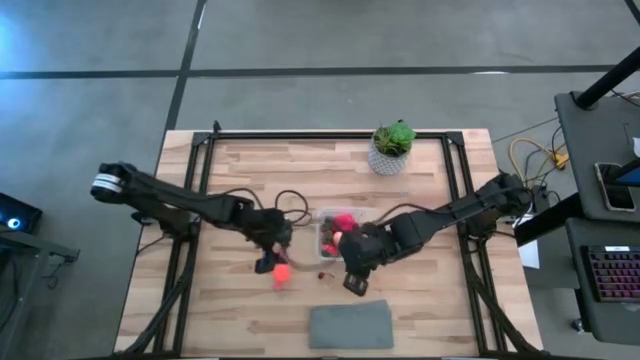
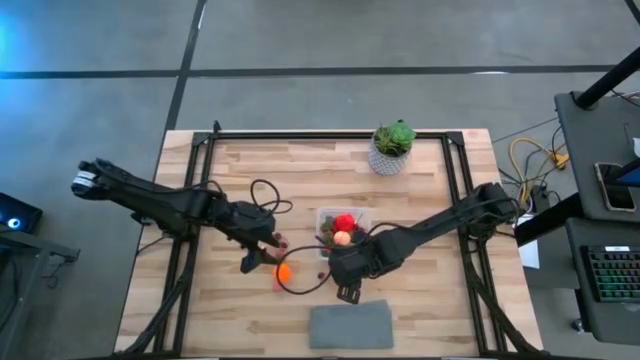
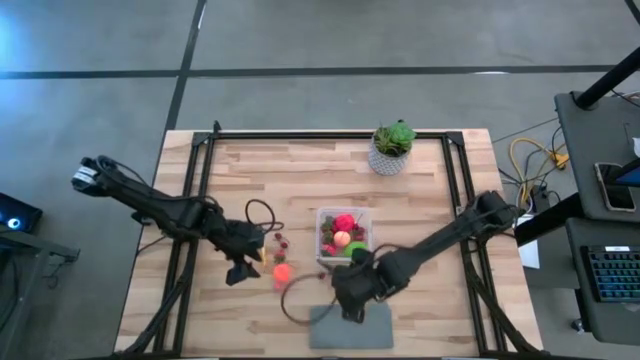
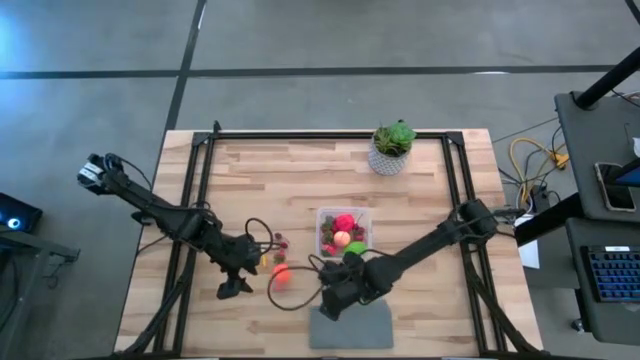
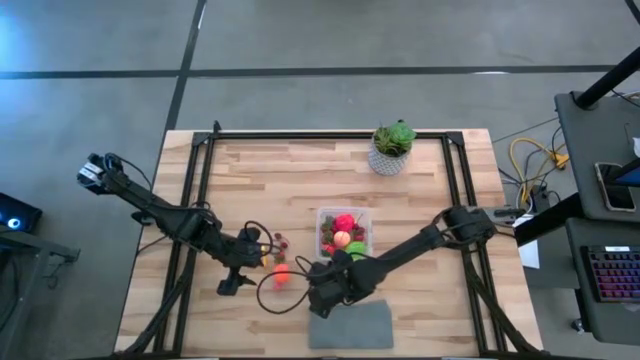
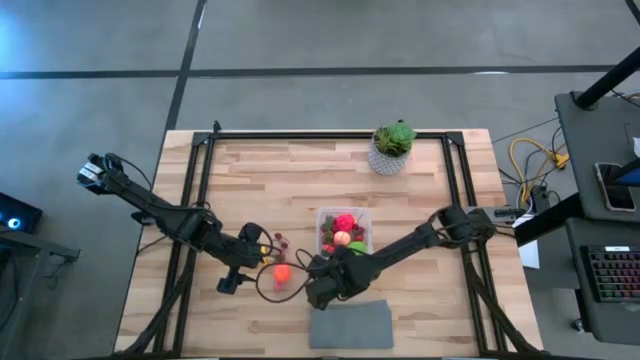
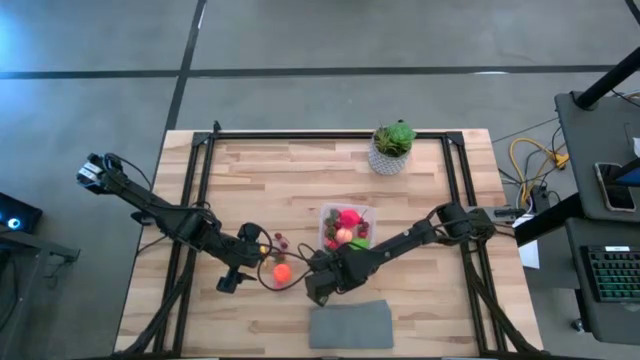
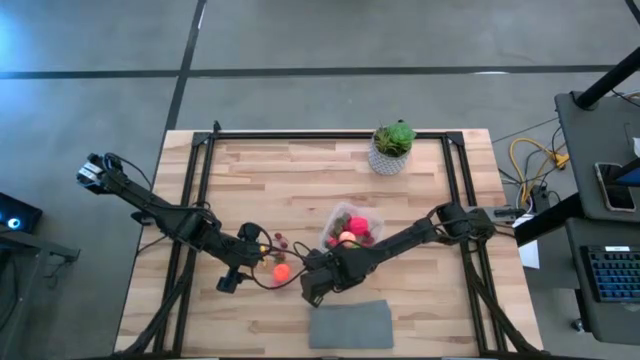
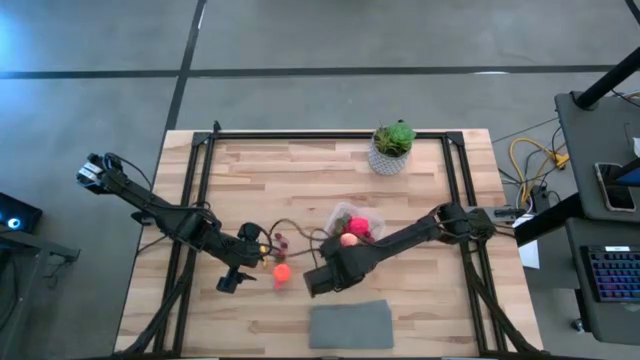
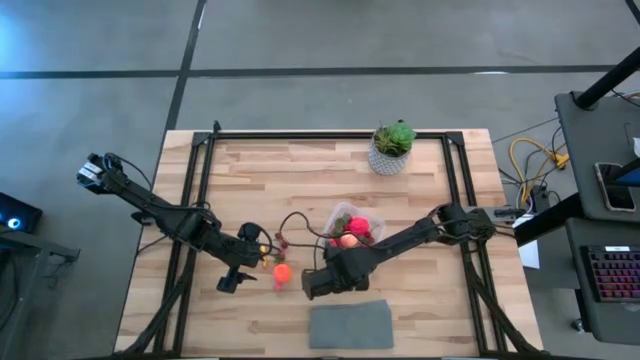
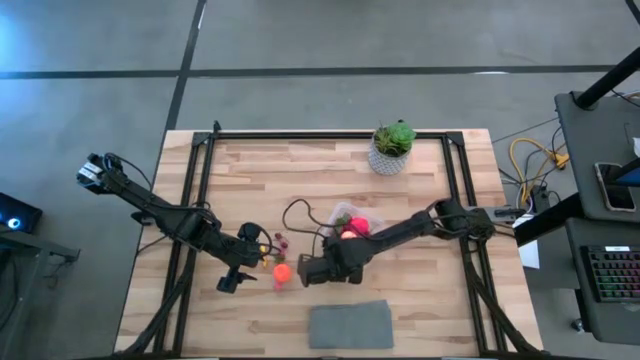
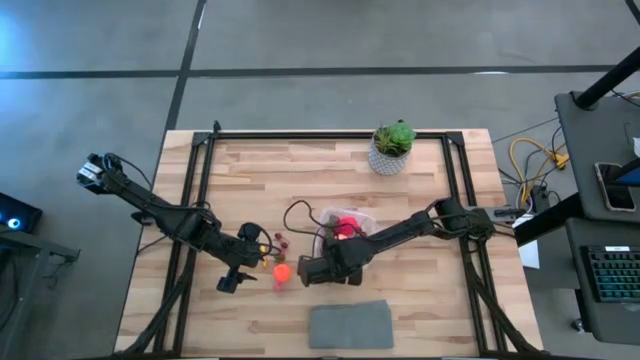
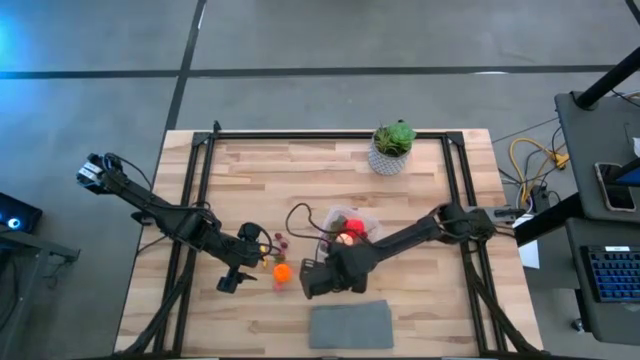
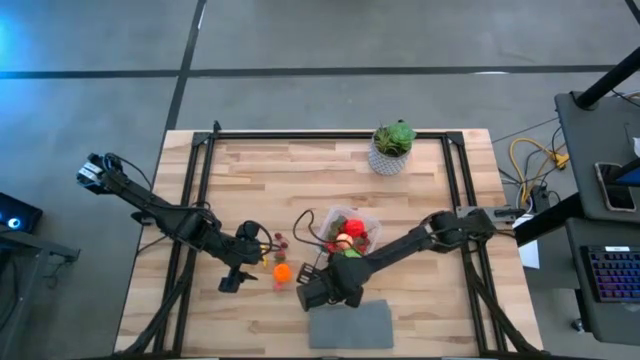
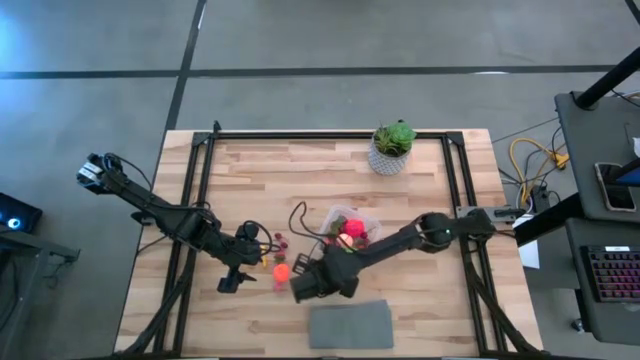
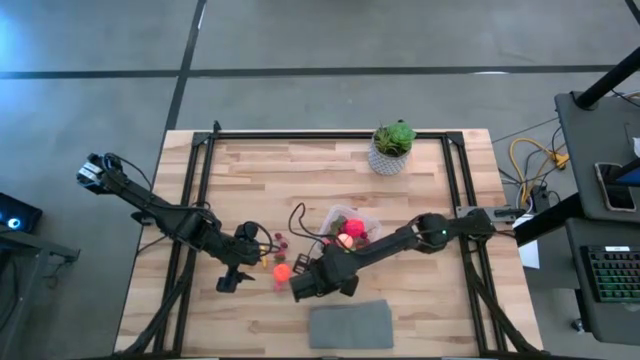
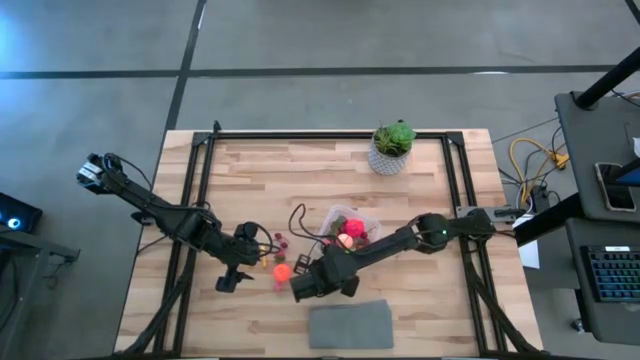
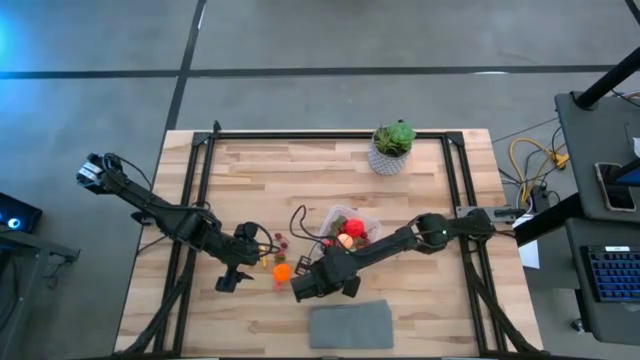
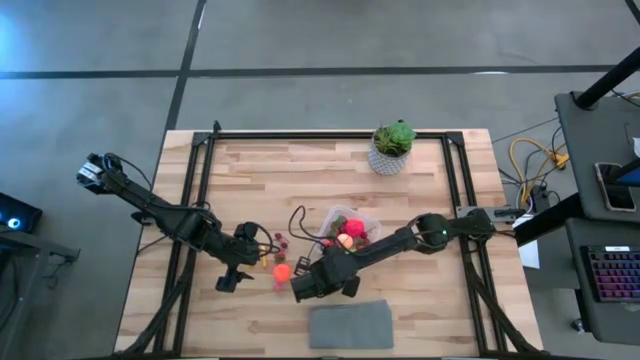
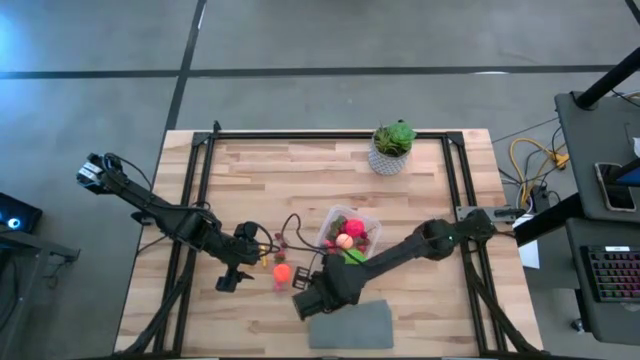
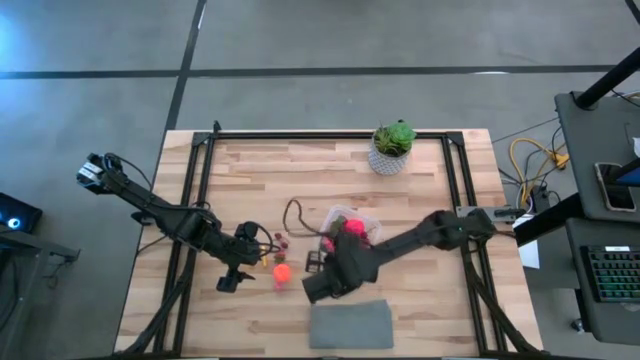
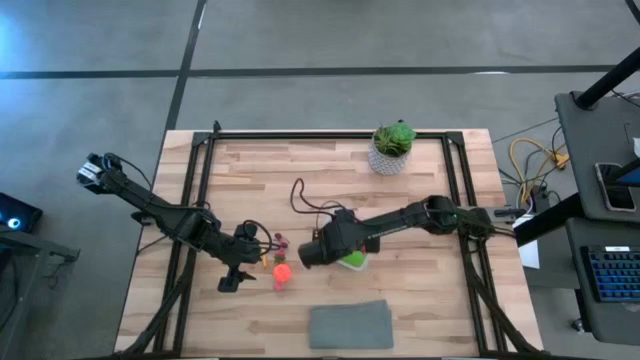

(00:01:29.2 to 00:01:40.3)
Task: Pick and placing Produce into tupperware
Put the red cherry into the transparent container

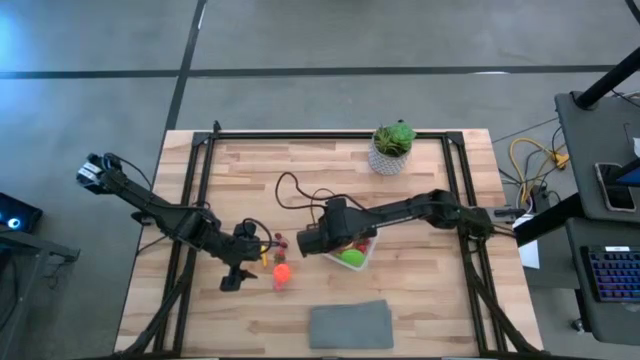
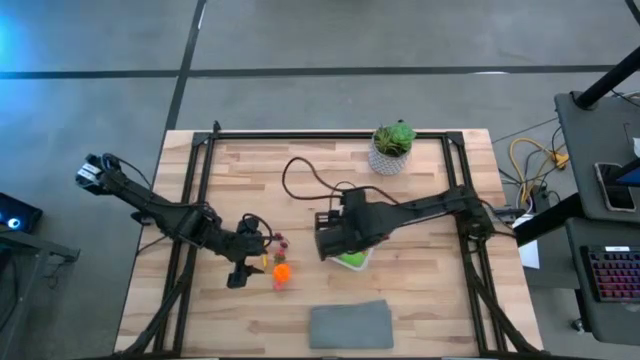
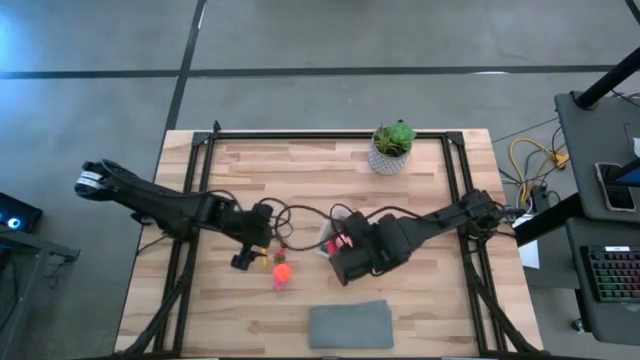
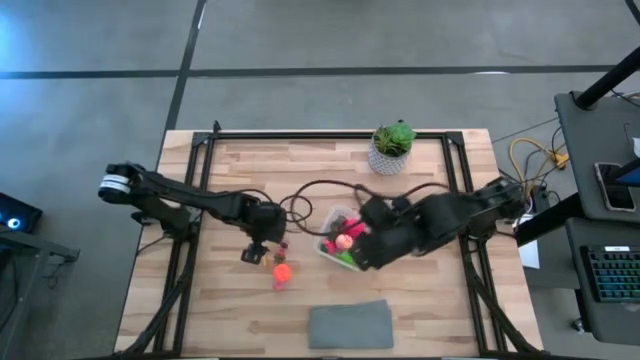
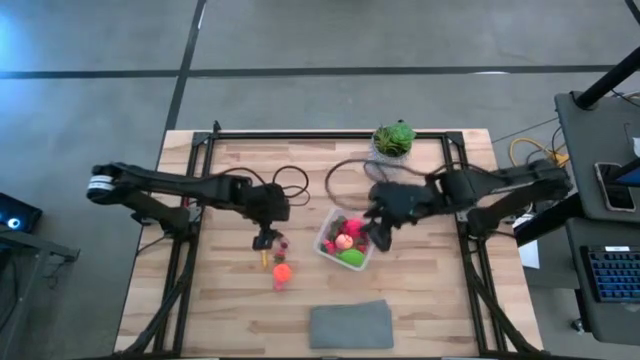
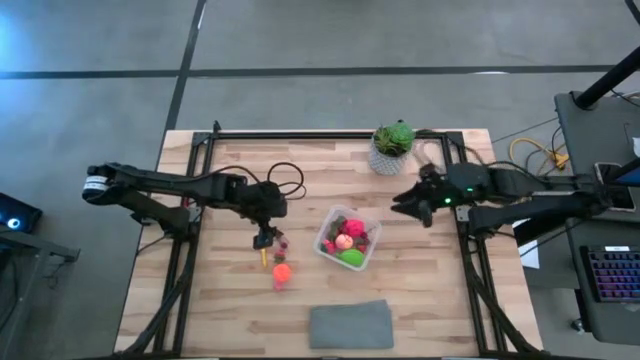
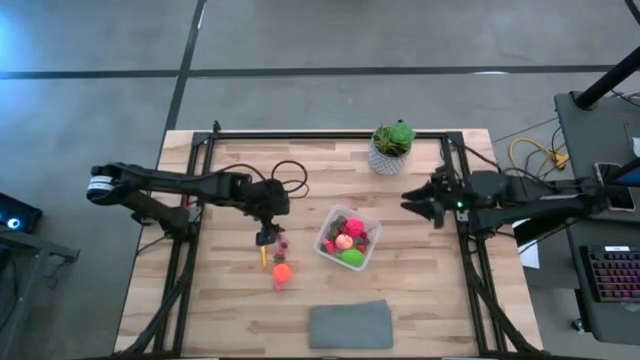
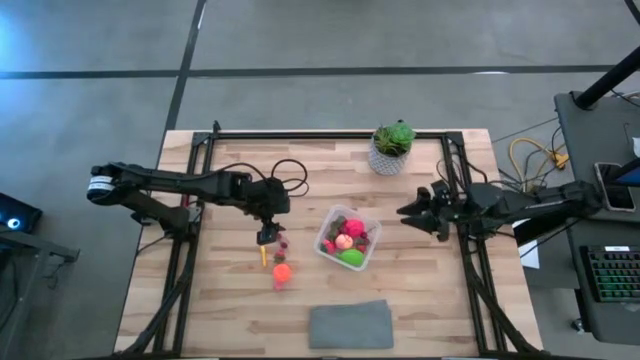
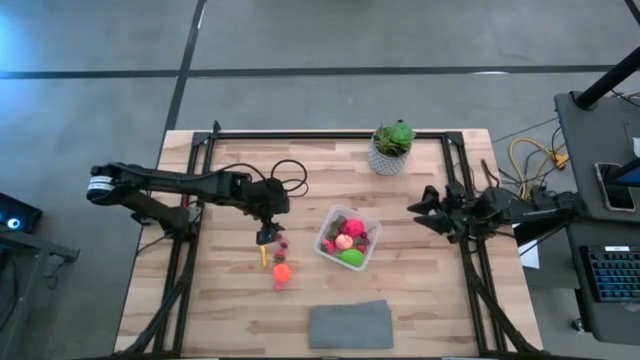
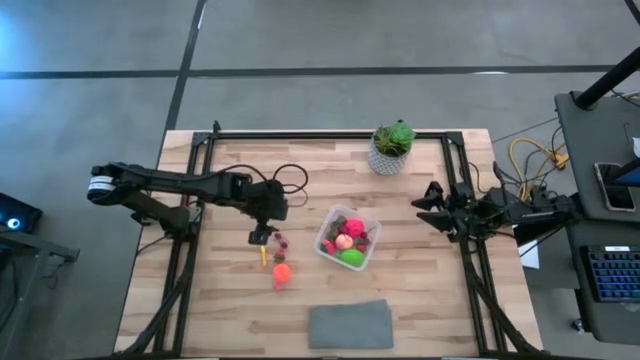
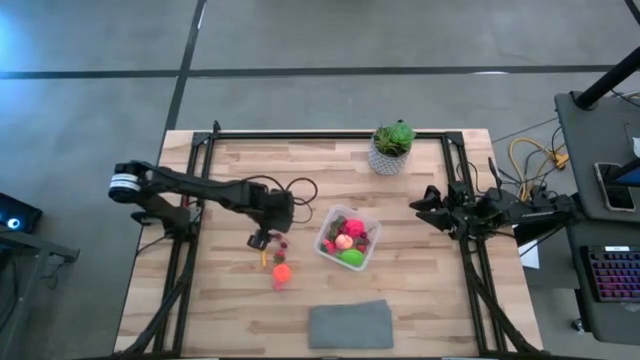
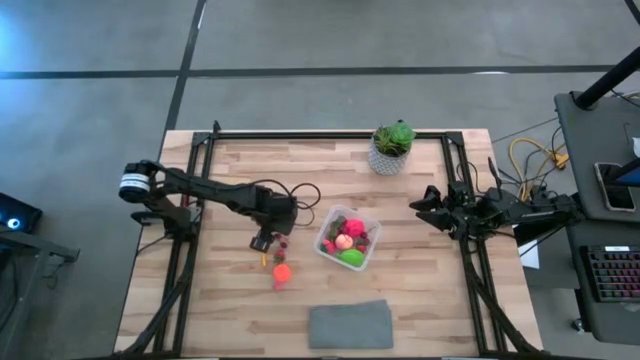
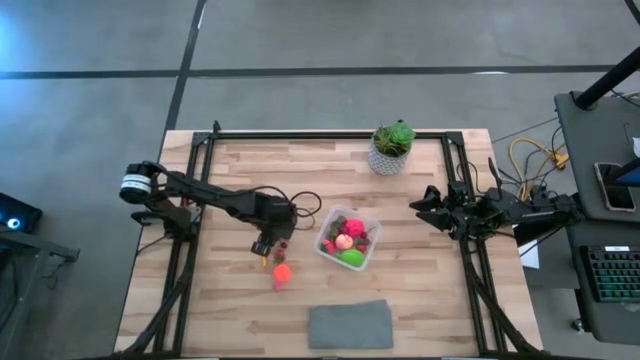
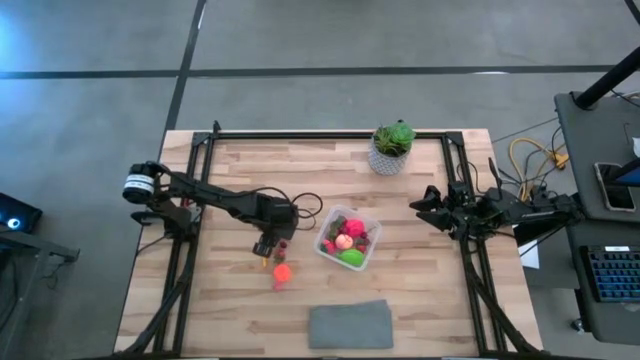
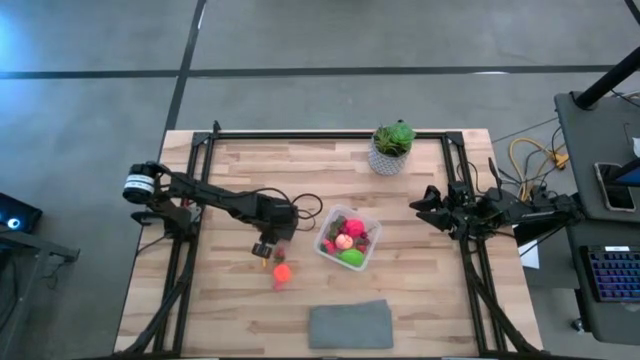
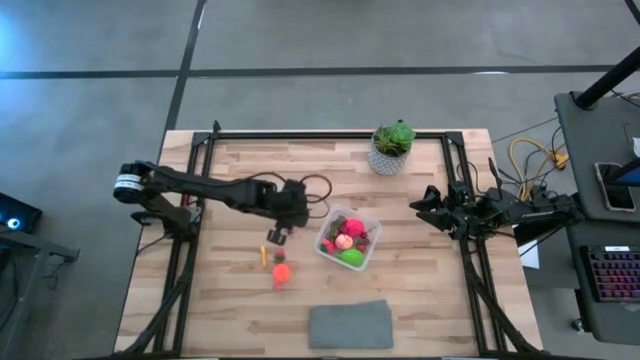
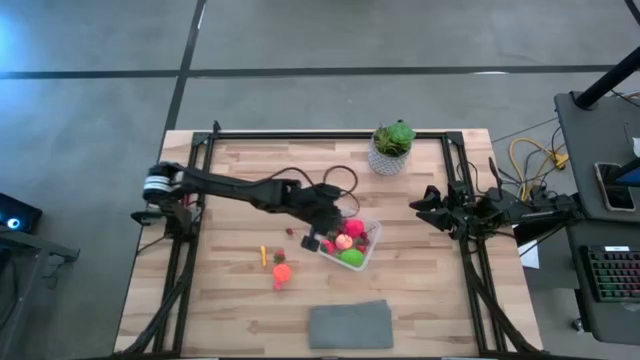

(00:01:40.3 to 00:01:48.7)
Put the red cherry into the transparent container

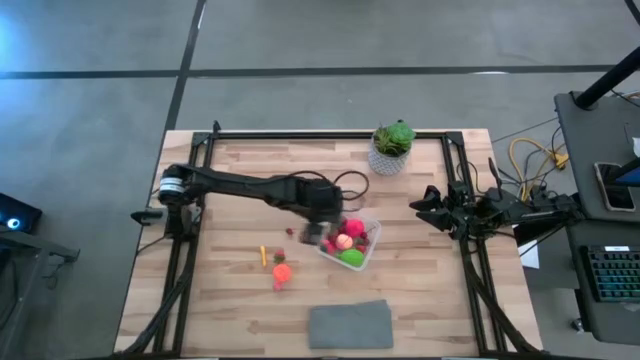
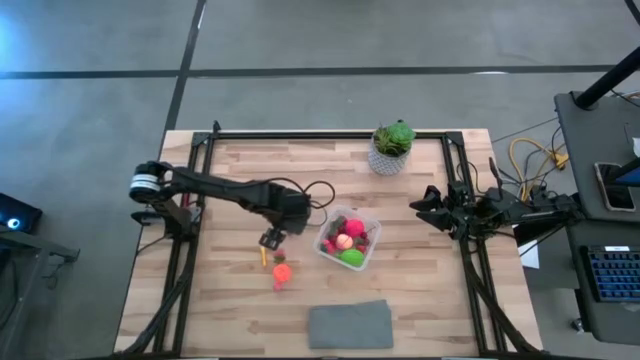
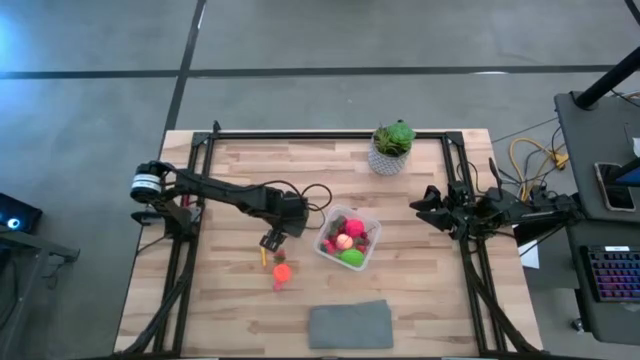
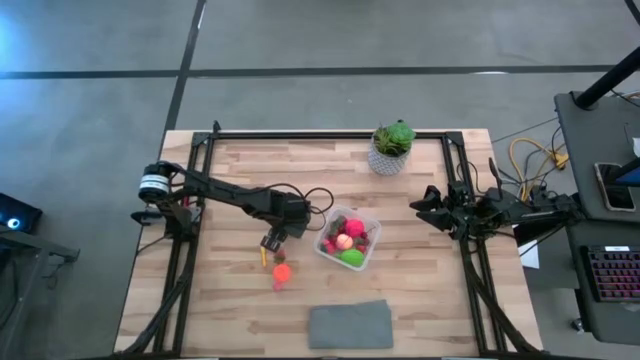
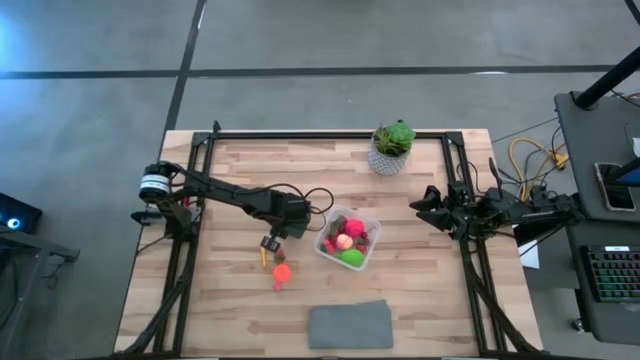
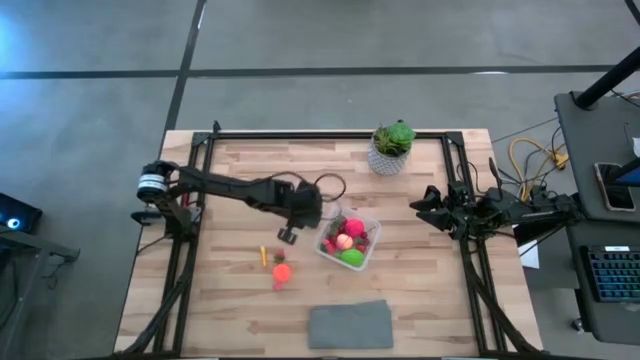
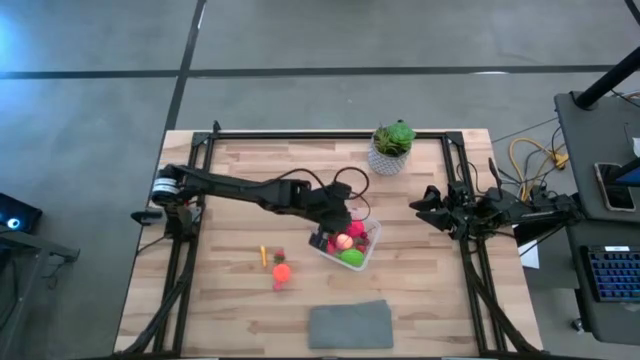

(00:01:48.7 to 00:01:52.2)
Put the red cherry into the transparent container
